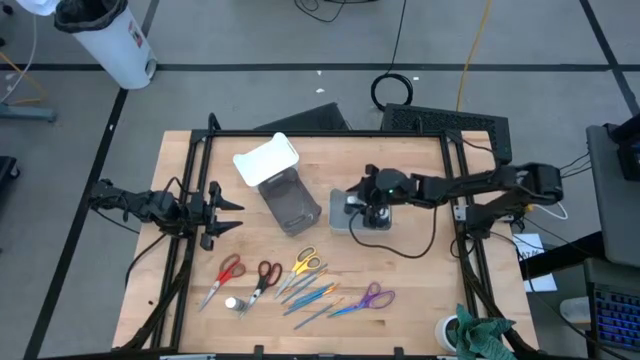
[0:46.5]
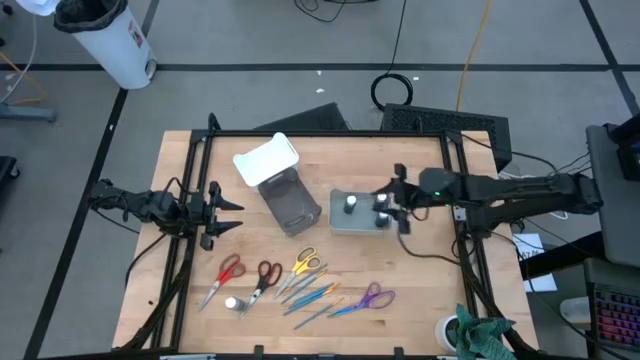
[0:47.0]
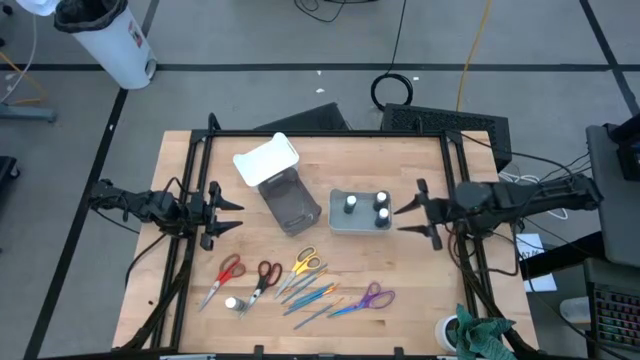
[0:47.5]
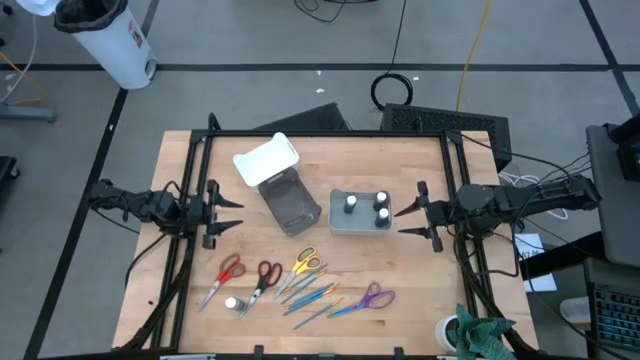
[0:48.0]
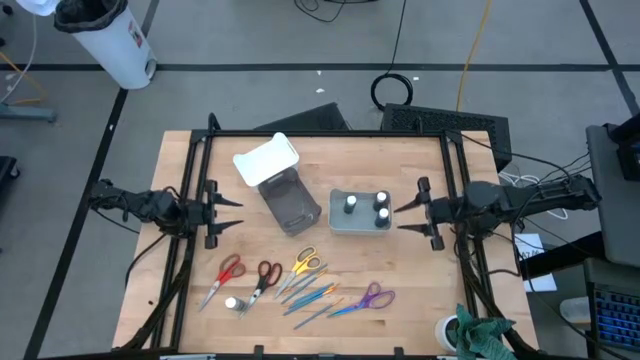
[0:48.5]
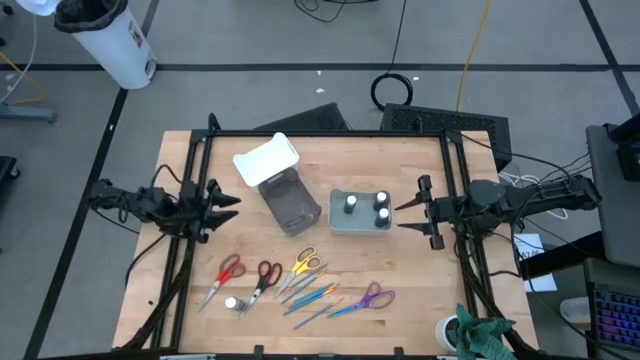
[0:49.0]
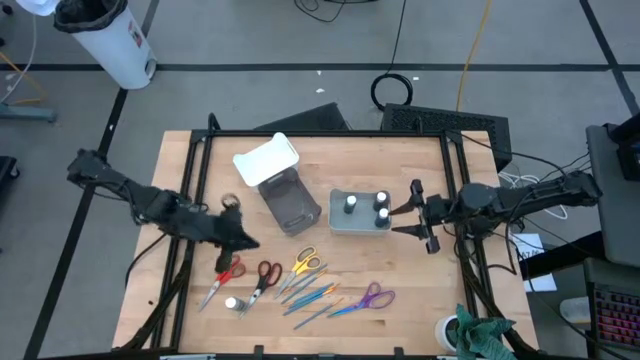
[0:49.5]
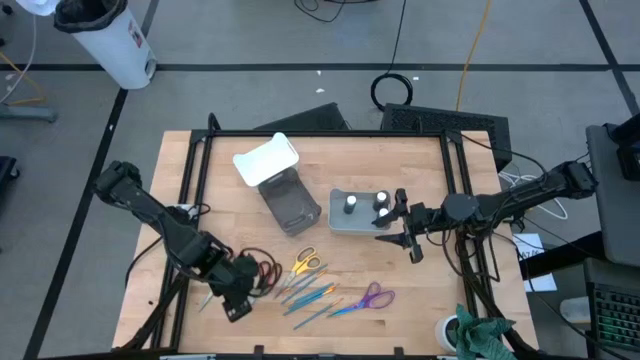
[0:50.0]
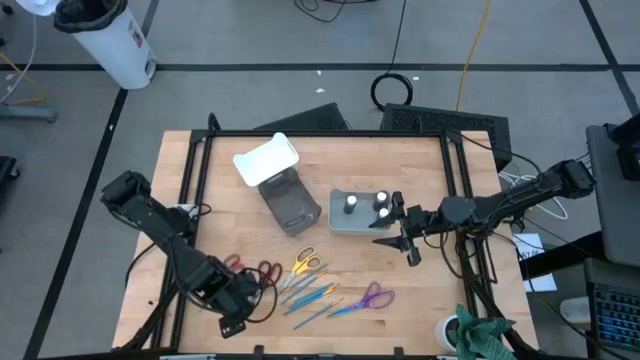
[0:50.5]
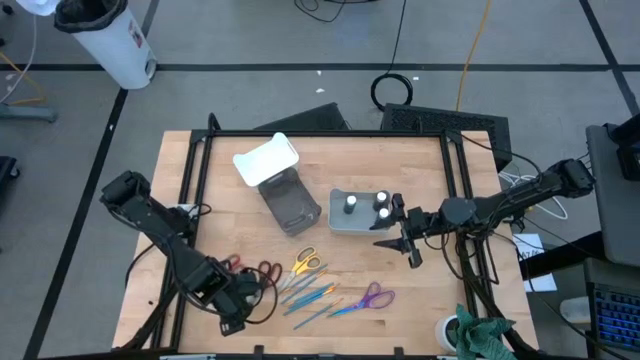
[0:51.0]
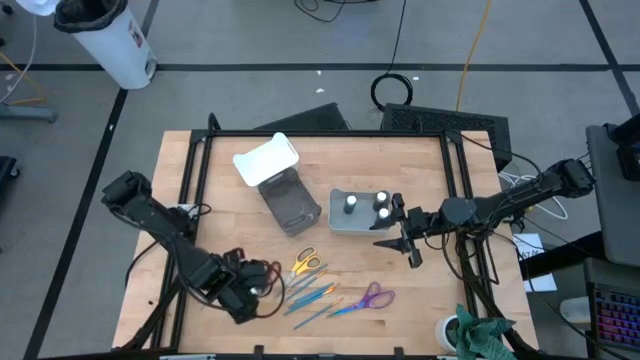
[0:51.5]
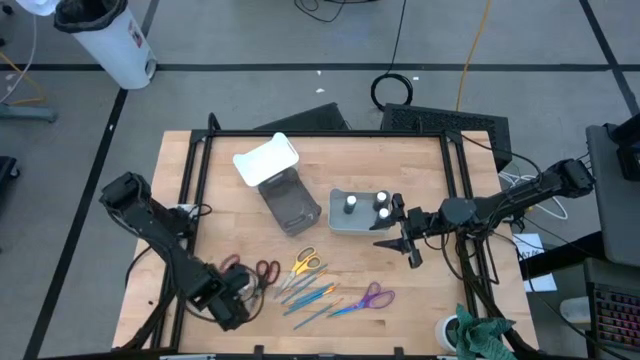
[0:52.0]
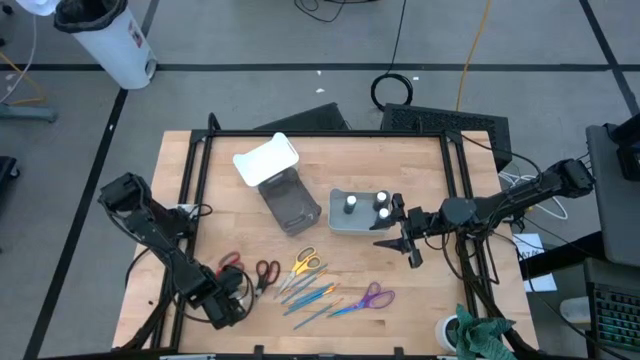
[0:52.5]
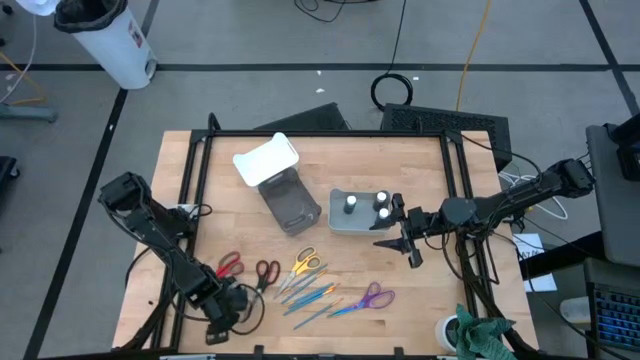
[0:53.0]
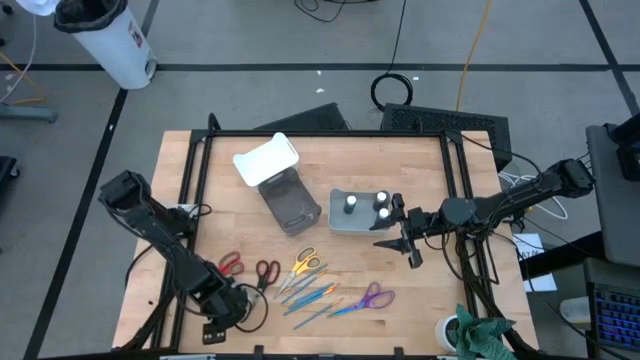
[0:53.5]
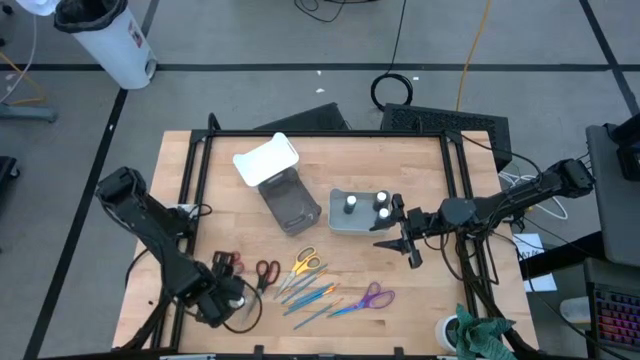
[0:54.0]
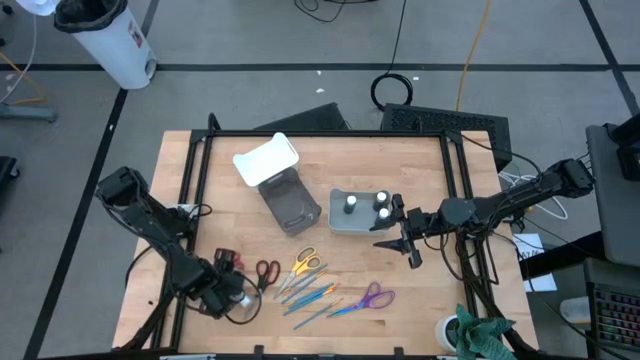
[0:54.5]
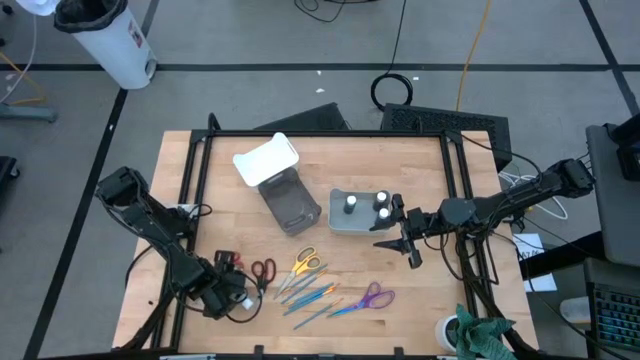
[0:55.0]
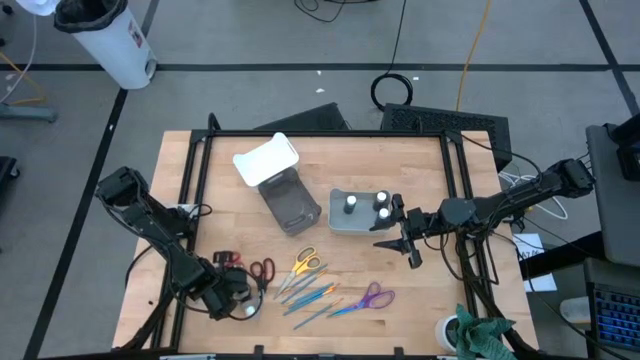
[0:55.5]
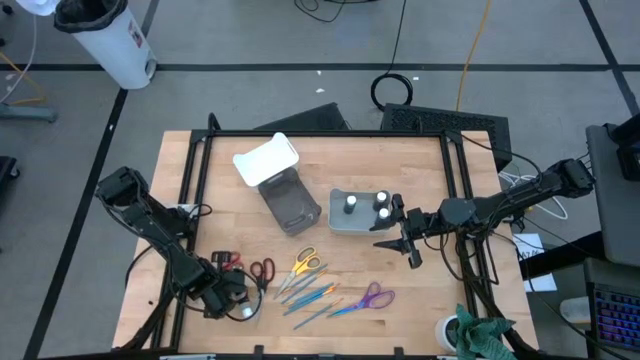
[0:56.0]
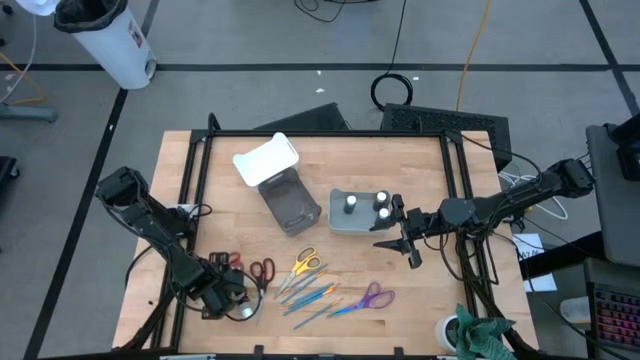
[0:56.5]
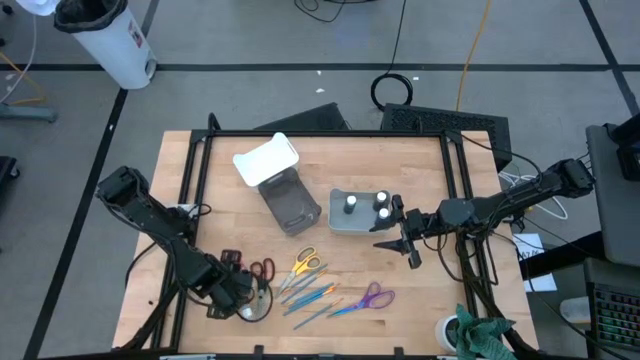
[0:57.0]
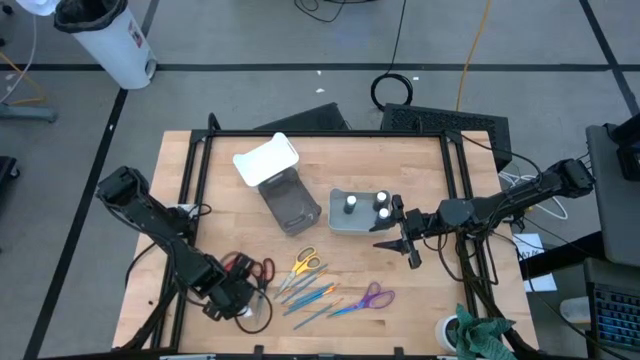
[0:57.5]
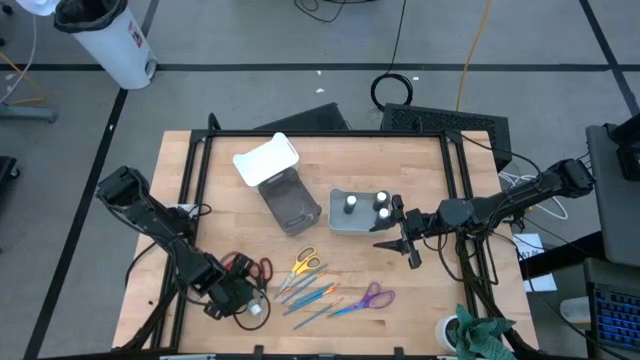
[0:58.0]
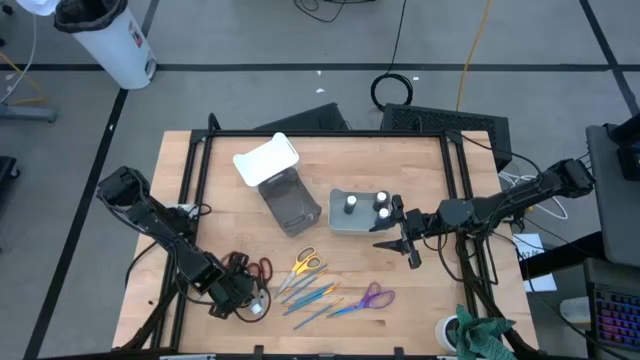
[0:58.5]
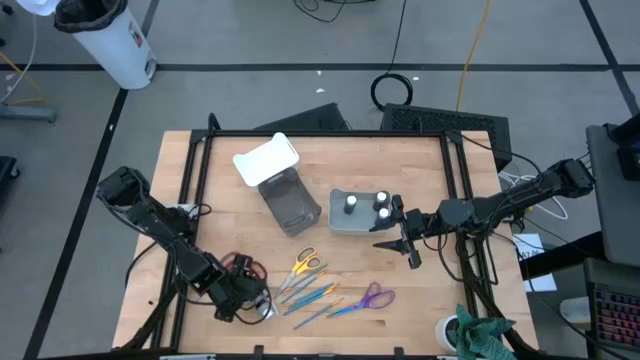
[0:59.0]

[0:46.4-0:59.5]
Task: Pick & Place Paint Supplies
Put the gray paint bottle into the gray bin

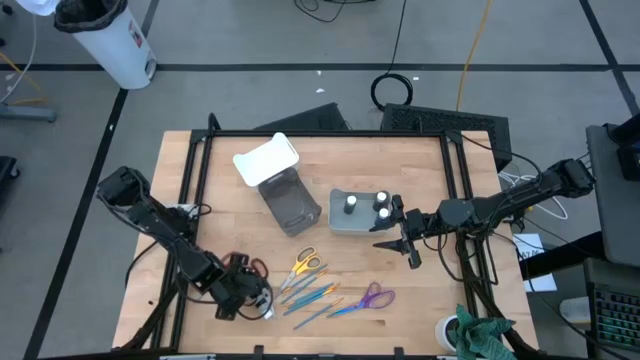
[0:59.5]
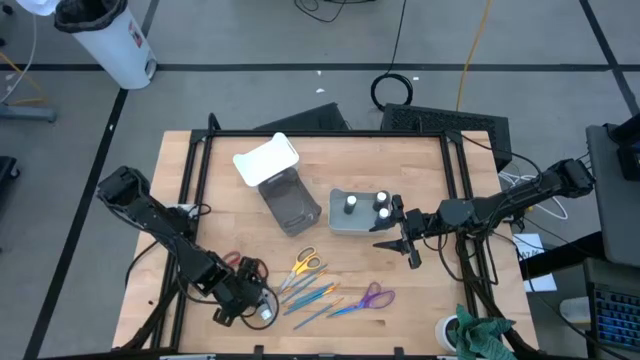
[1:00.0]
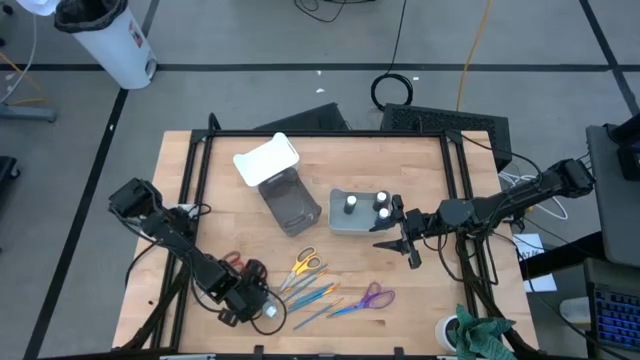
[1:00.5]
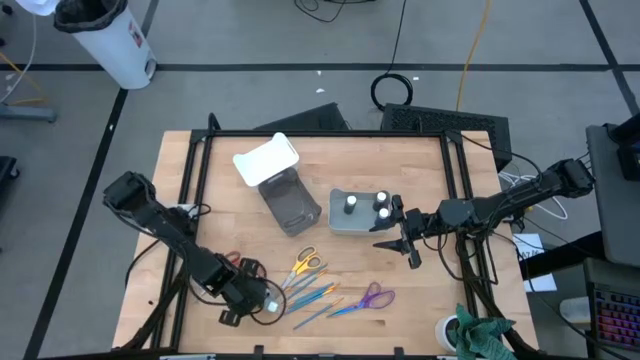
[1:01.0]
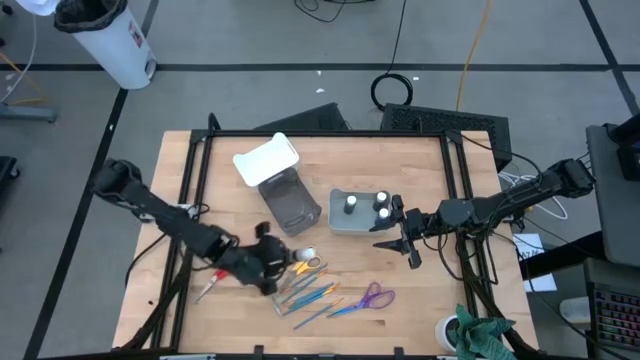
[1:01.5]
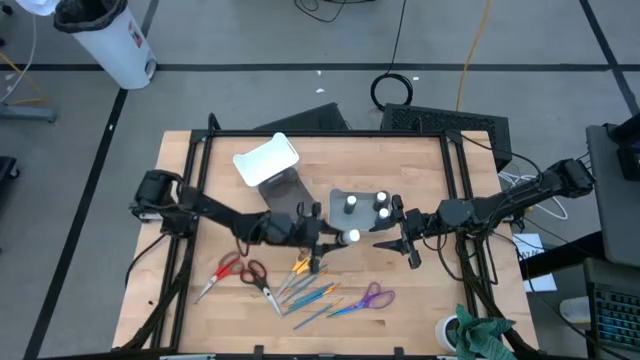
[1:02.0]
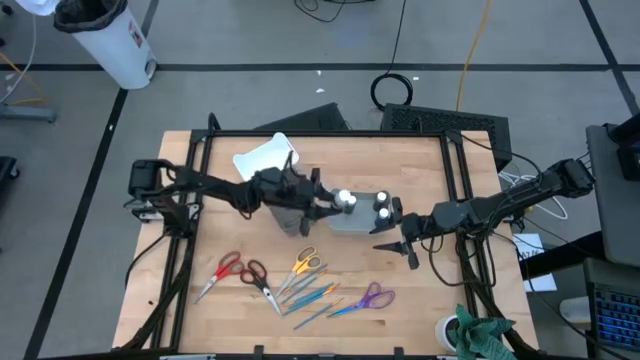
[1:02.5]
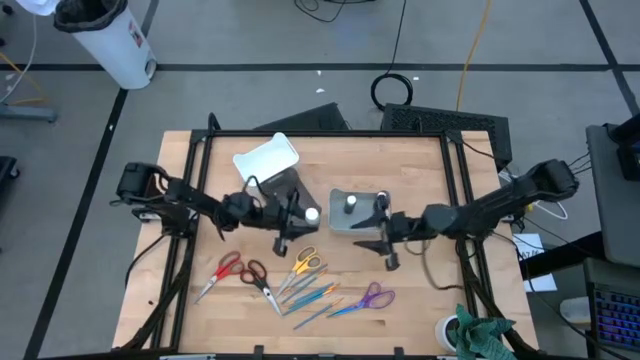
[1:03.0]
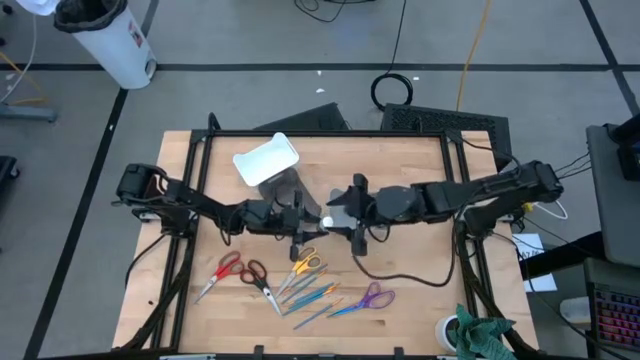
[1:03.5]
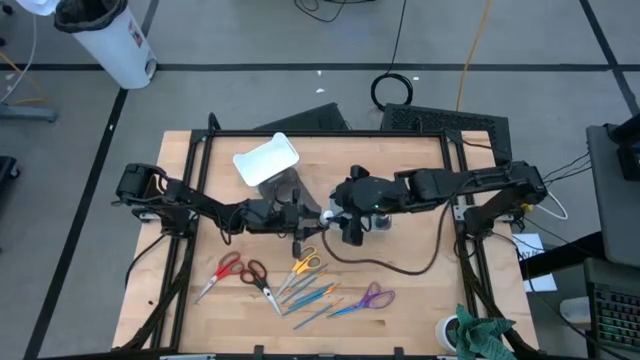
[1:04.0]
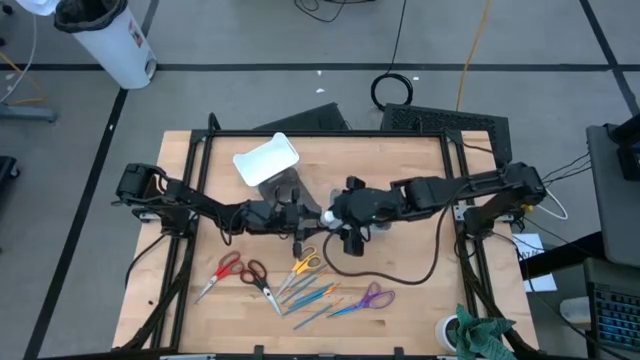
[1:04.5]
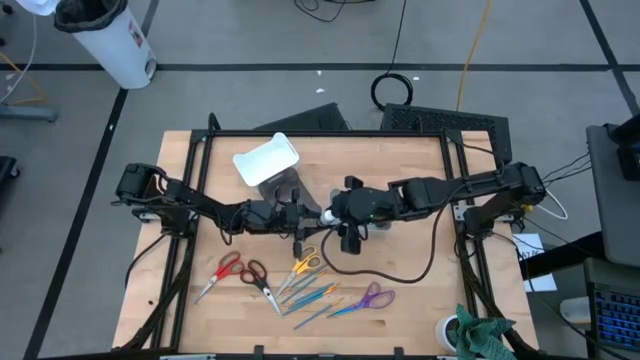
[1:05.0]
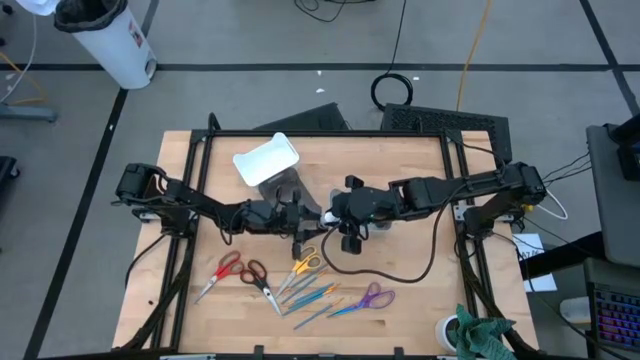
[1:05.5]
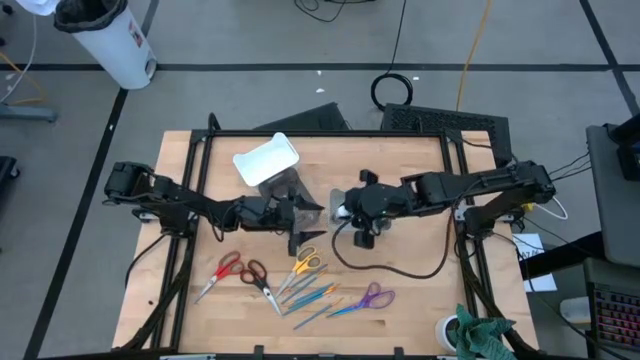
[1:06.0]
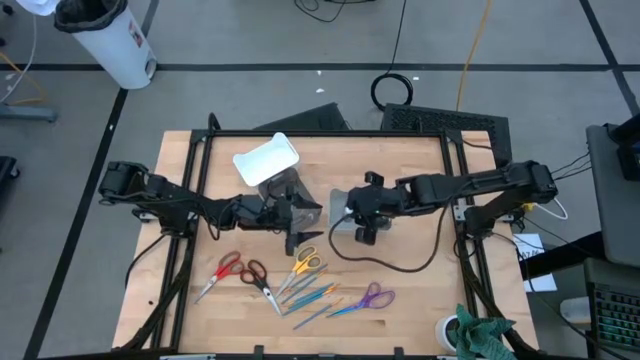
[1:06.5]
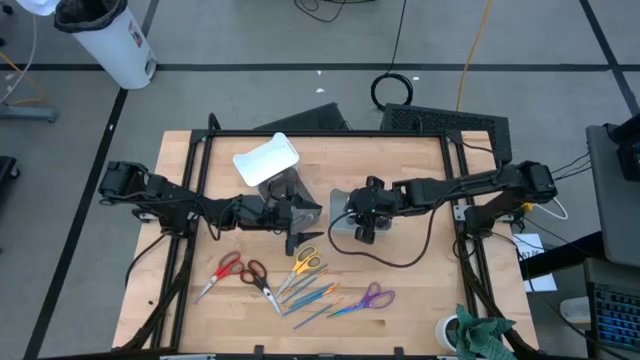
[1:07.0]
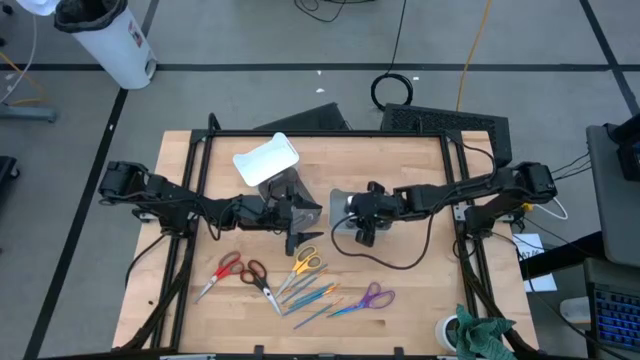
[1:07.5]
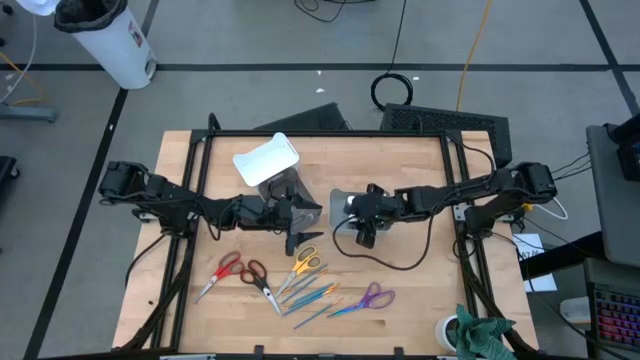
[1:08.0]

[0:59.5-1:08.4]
Put the gray paint bottle into the gray bin

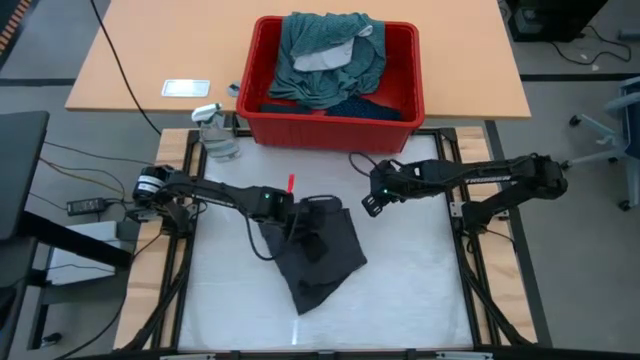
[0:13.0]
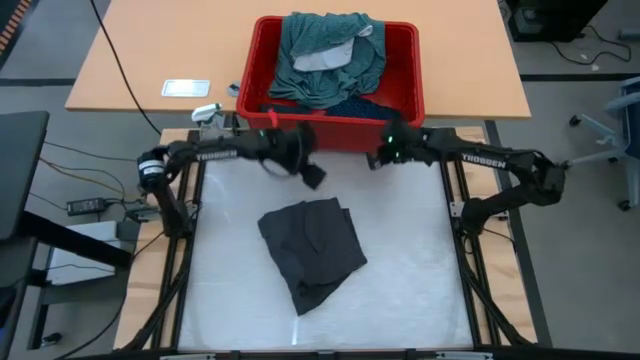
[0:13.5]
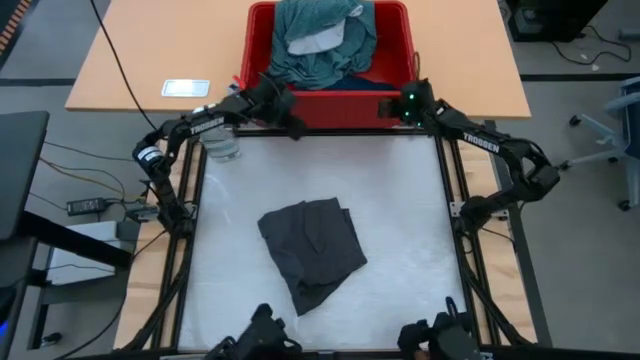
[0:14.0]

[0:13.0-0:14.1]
Task: Fold Laundry from Bin
Adjust the red organizer bin
